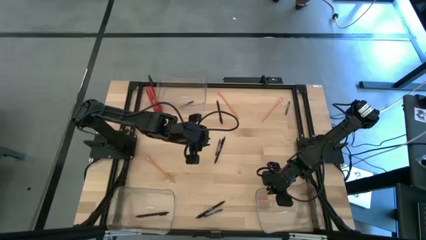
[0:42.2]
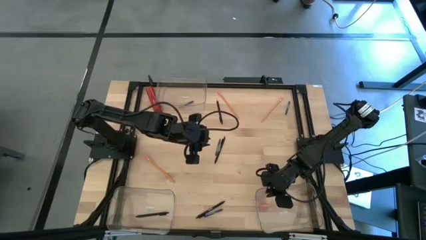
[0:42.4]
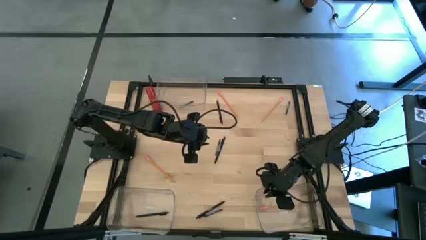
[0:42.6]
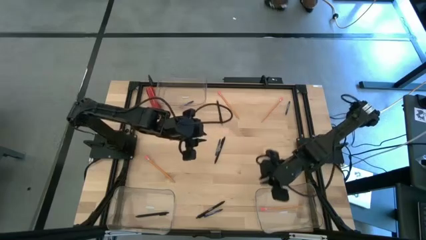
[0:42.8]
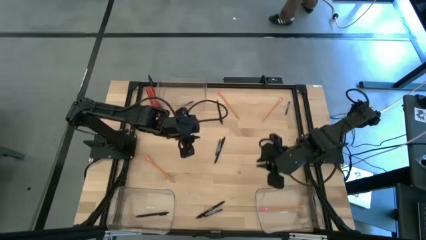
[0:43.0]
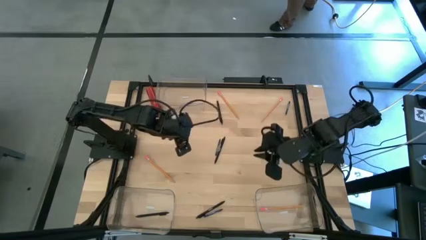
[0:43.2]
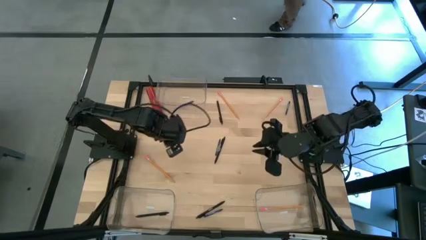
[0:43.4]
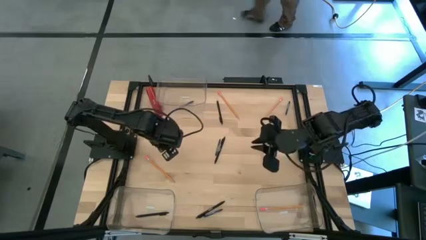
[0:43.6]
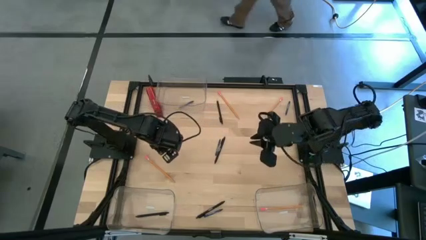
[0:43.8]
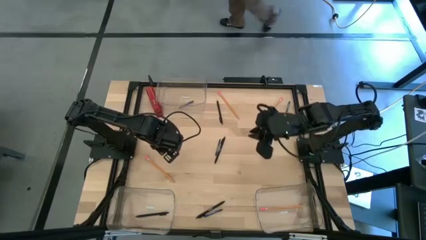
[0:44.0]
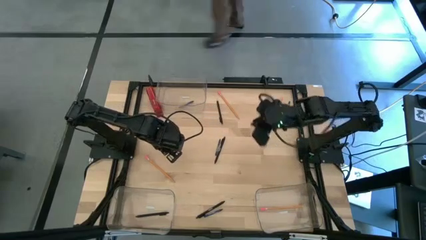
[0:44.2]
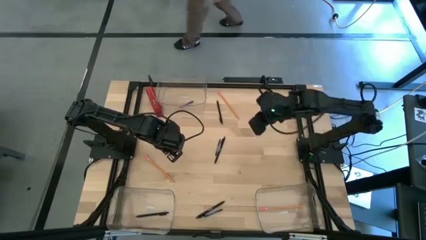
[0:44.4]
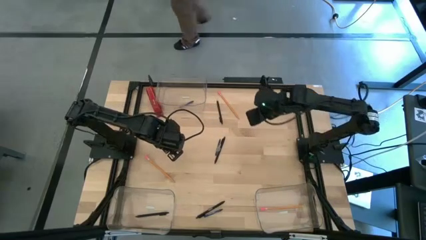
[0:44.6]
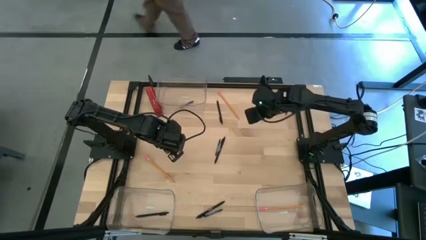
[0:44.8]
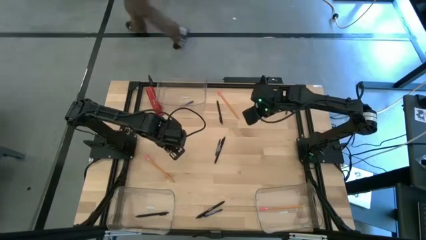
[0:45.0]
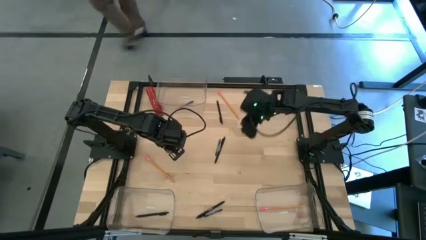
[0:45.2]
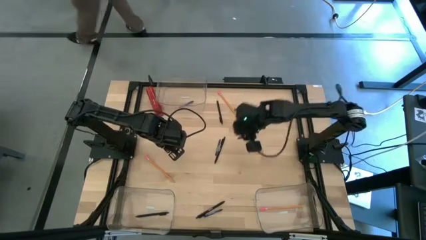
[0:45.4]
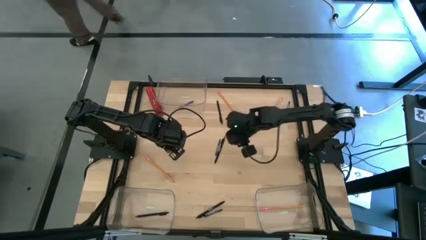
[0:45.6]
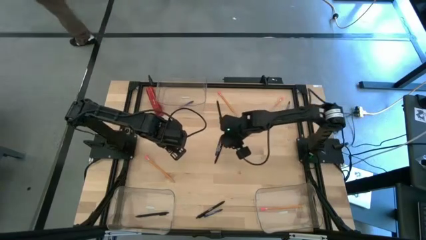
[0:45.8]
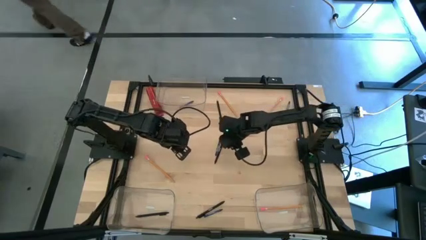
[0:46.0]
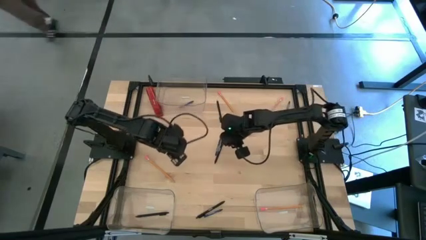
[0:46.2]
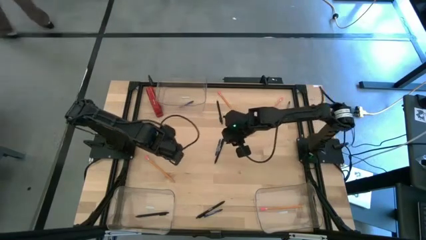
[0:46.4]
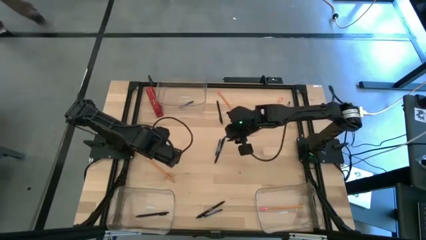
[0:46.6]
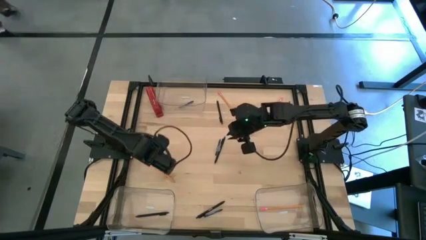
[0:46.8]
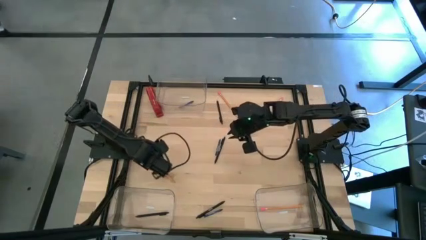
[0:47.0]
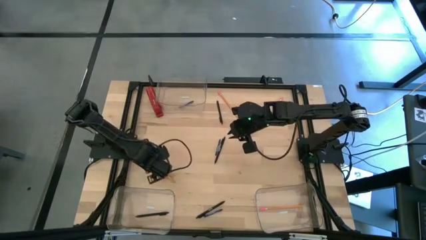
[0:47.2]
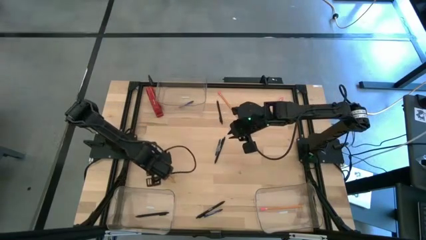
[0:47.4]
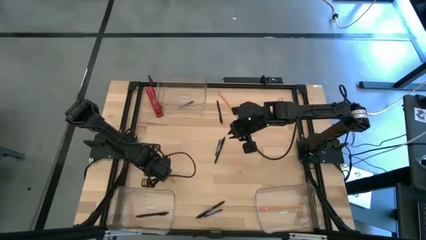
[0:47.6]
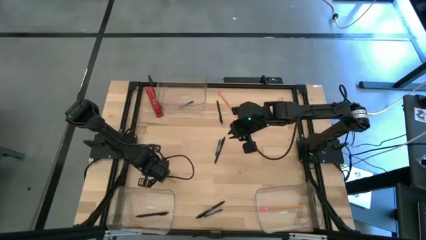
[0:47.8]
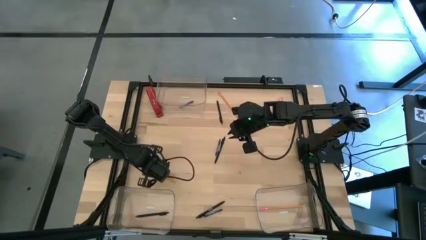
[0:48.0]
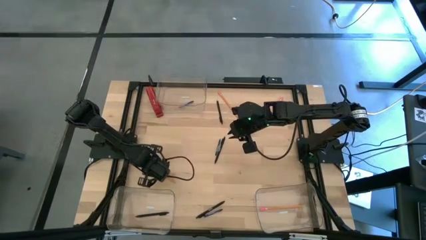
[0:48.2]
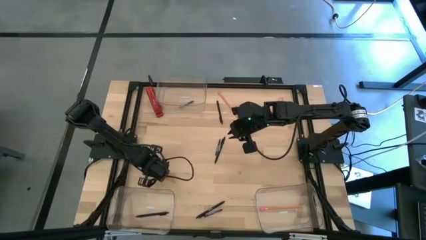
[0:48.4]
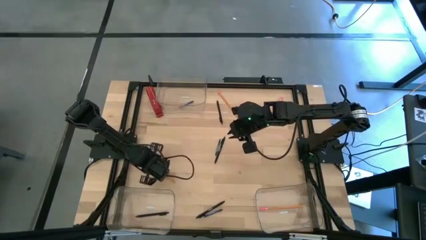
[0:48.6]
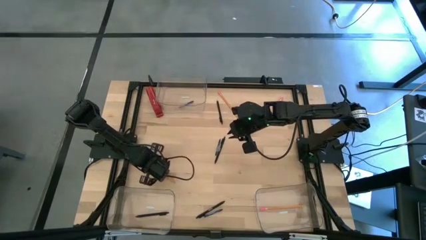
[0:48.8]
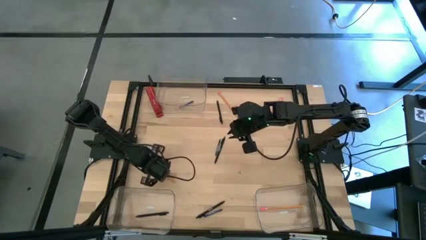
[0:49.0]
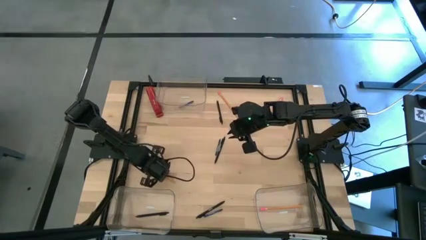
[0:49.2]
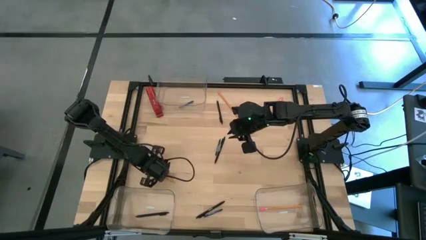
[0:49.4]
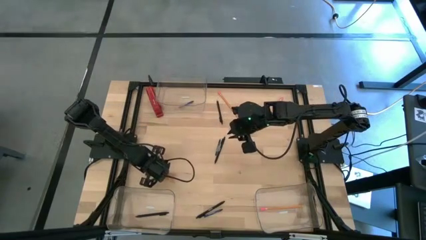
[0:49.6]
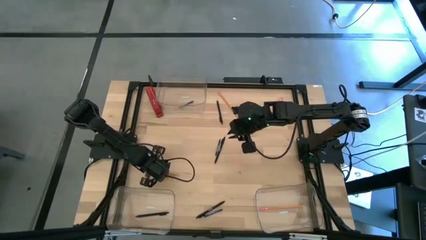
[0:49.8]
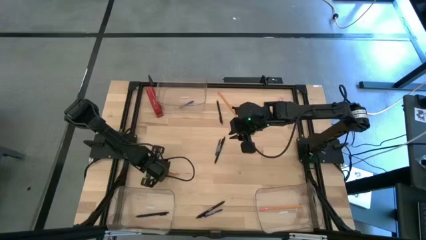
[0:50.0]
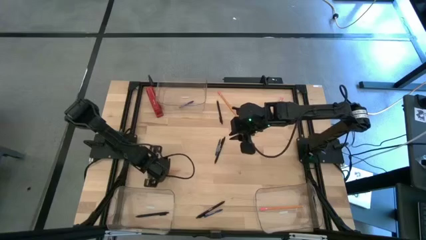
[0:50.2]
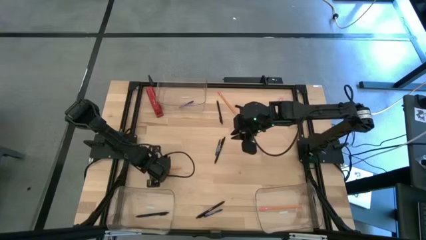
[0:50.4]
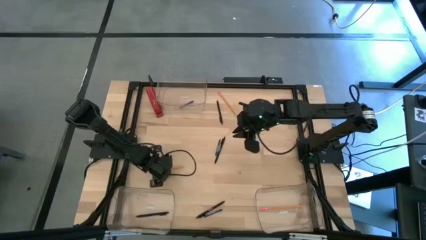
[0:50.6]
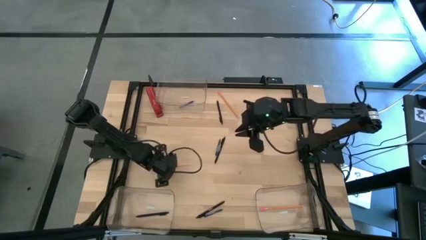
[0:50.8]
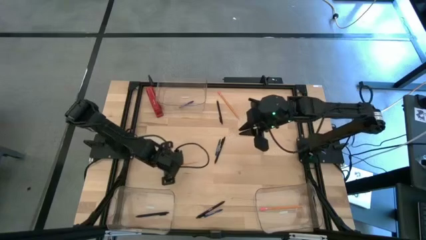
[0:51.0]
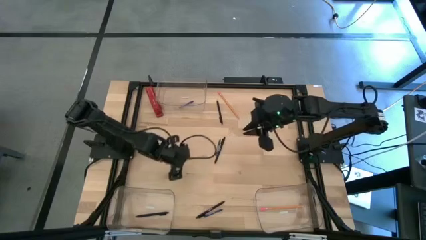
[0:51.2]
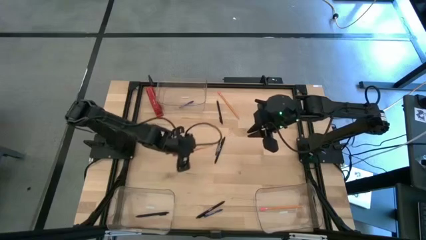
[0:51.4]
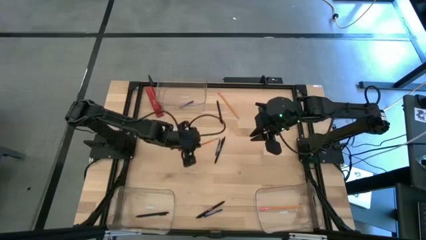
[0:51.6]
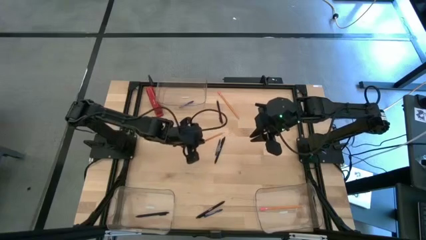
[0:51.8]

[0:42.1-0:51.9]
Task: Sort crayons/erasers/pens/pencils in bins
Put the yellow pencil into the bottom right transparent bin

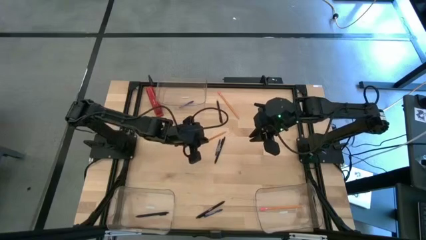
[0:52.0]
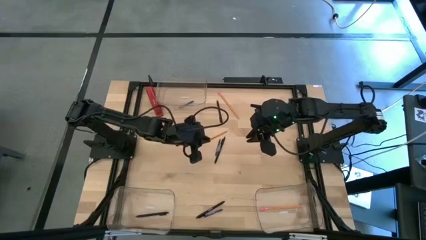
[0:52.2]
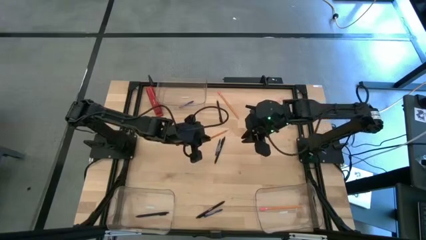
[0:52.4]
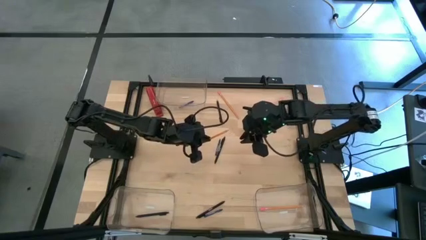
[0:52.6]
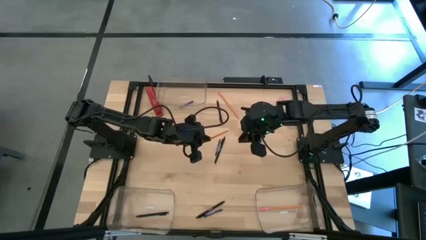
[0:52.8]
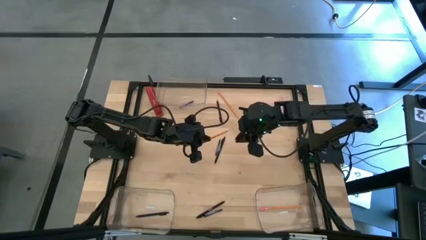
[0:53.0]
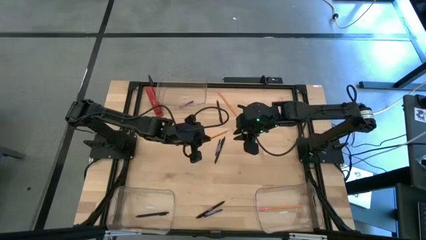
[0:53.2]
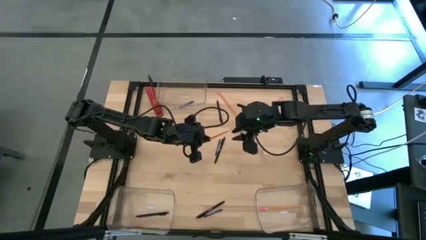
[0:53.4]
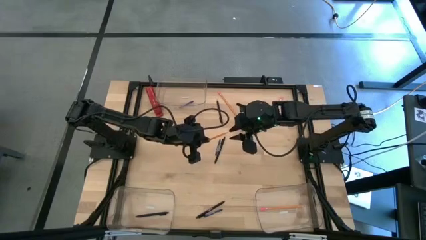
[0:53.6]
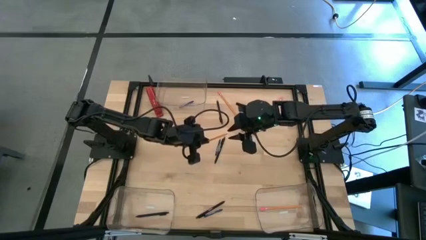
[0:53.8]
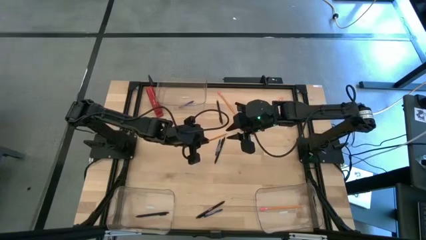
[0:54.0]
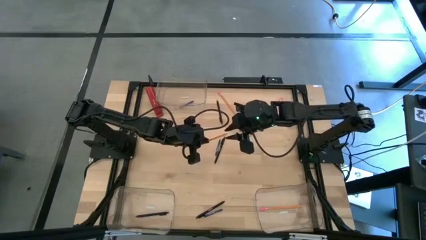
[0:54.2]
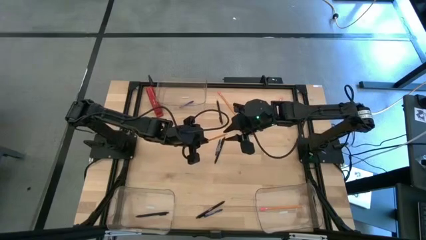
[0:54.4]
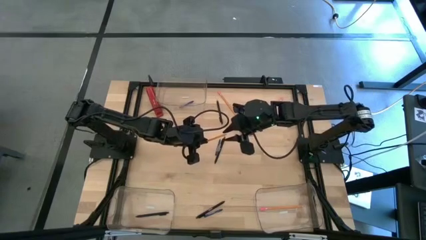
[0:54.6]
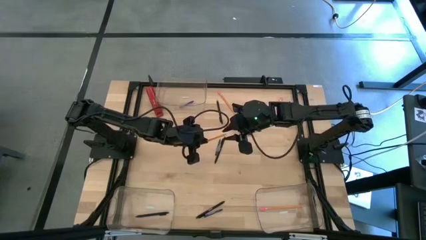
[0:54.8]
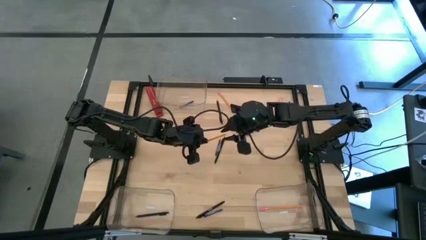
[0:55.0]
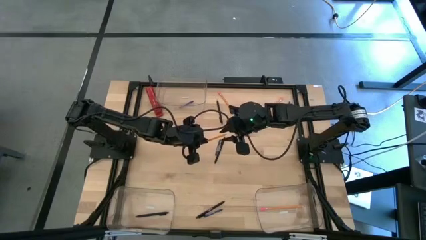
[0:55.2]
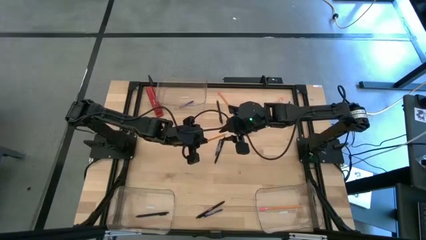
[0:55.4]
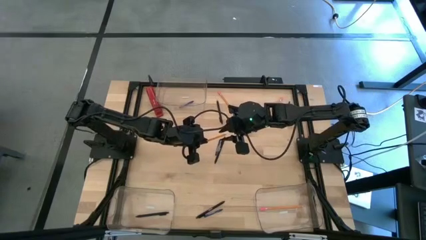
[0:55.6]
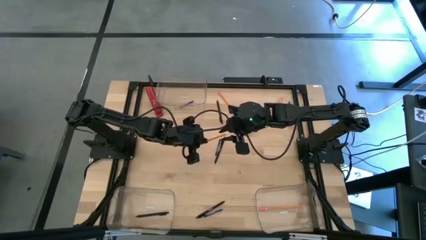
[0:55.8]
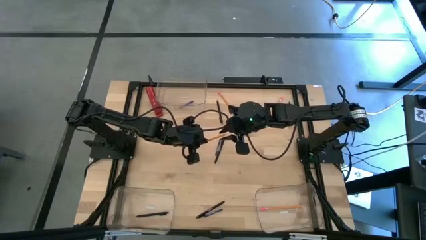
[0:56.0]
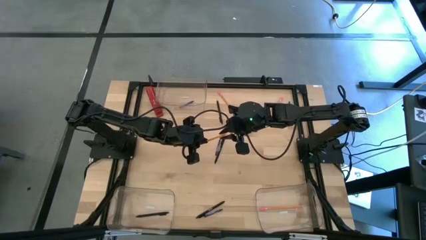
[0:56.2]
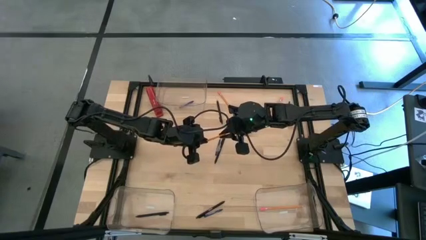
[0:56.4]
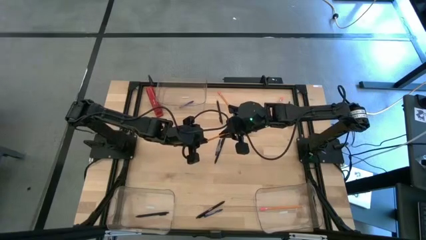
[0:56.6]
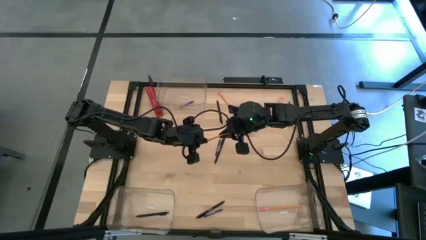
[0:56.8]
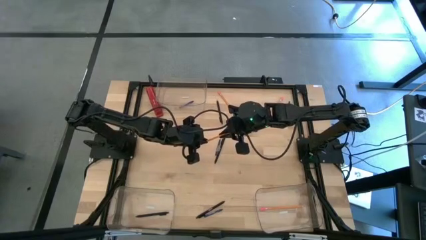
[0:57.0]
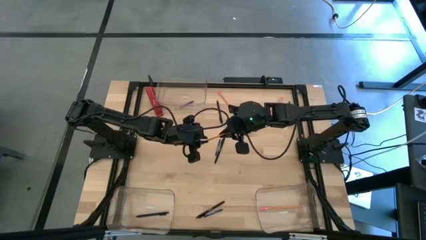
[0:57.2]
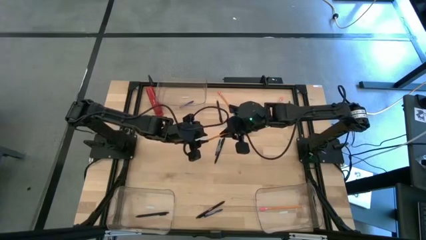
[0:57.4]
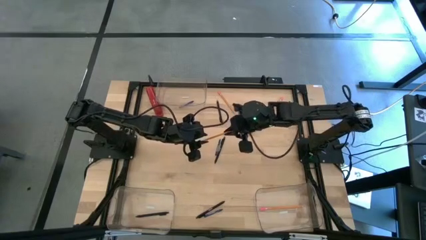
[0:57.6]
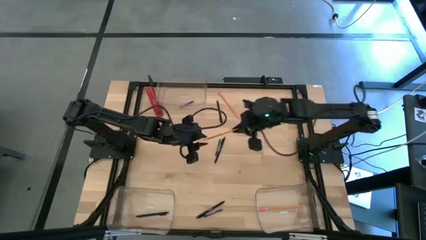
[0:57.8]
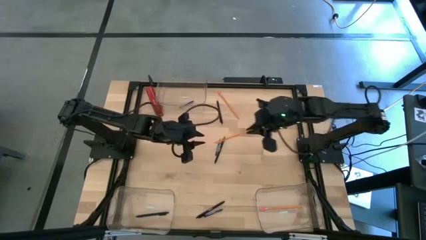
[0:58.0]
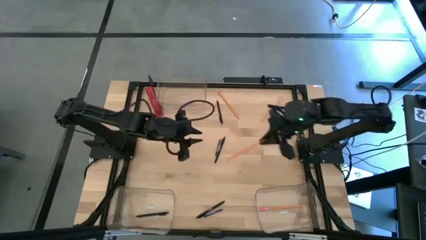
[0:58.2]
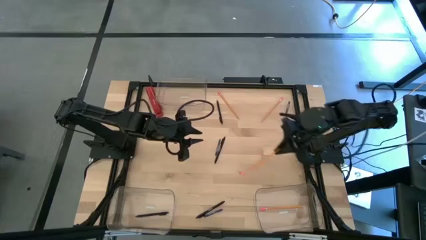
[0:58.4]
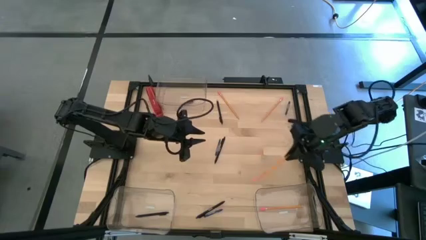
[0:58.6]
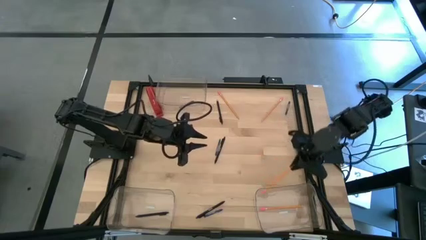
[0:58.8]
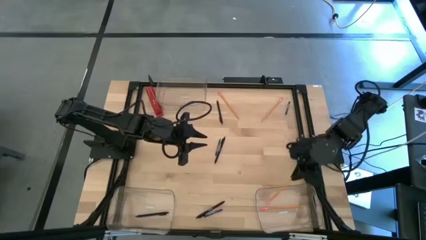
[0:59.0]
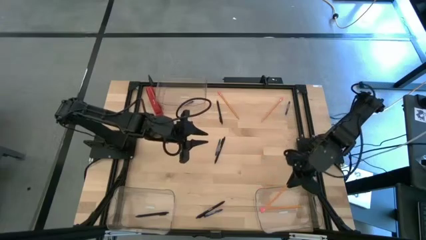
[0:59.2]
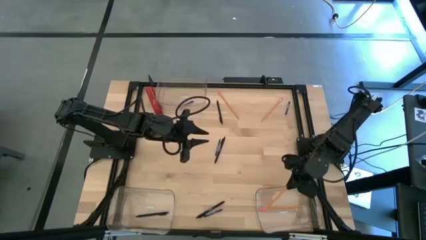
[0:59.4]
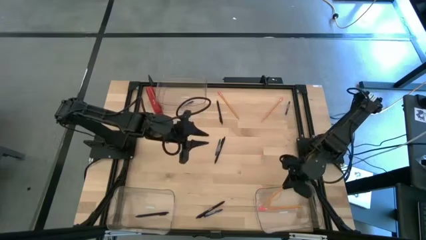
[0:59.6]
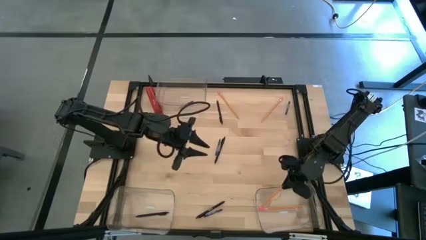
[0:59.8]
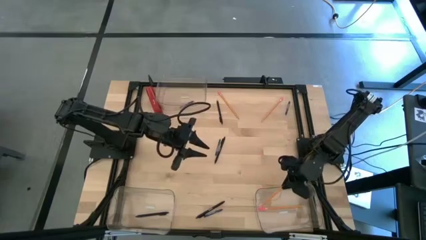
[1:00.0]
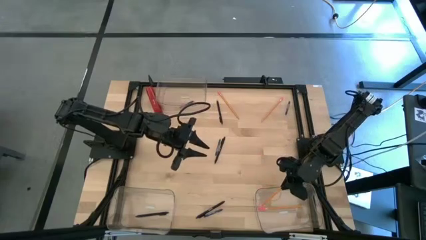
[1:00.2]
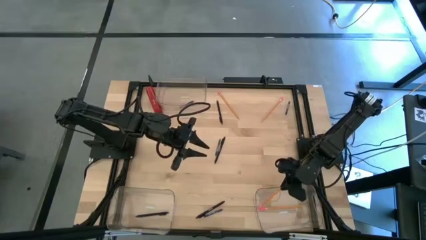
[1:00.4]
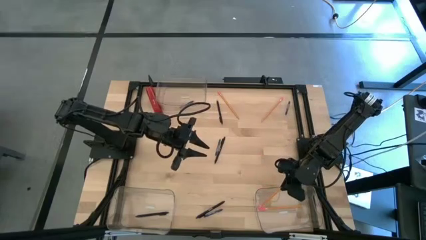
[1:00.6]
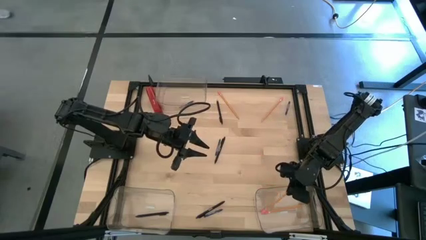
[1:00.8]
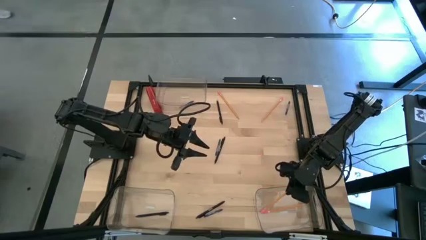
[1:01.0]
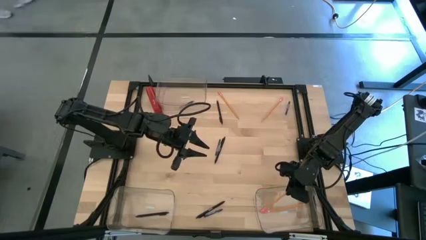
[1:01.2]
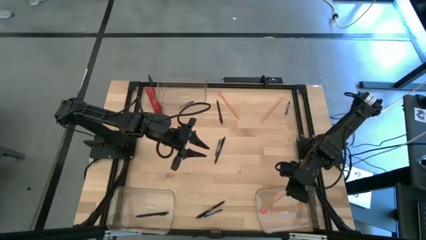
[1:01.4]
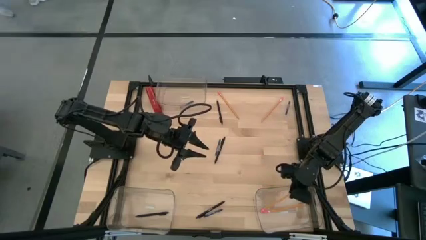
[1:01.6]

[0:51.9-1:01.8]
Put the yellow pencil into the bottom right transparent bin
